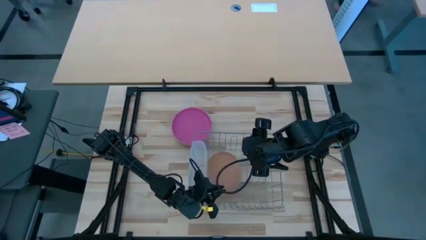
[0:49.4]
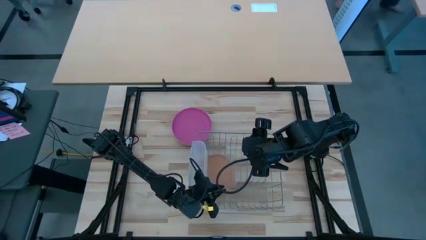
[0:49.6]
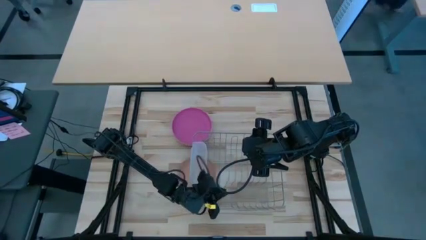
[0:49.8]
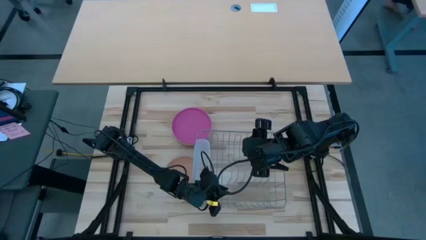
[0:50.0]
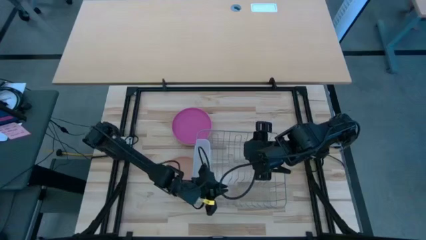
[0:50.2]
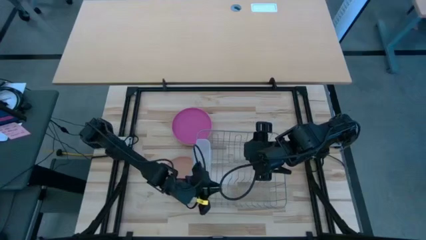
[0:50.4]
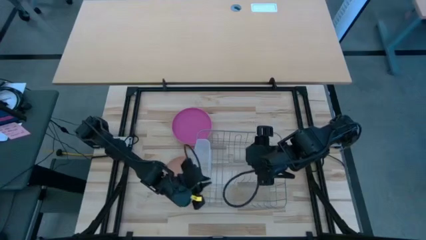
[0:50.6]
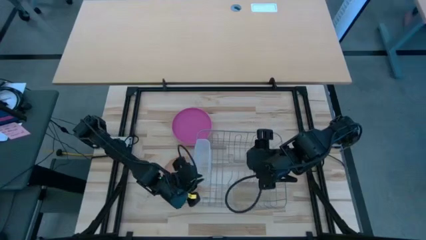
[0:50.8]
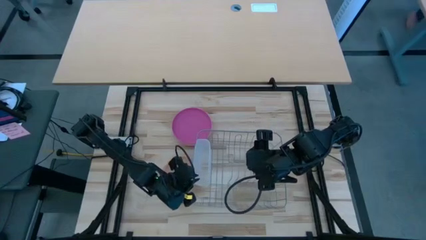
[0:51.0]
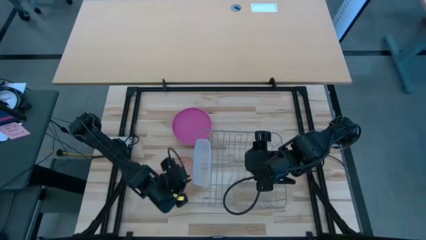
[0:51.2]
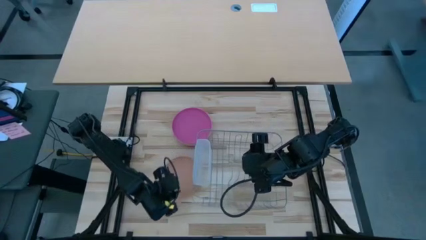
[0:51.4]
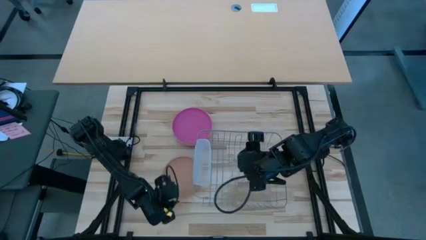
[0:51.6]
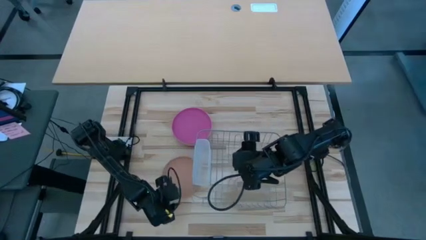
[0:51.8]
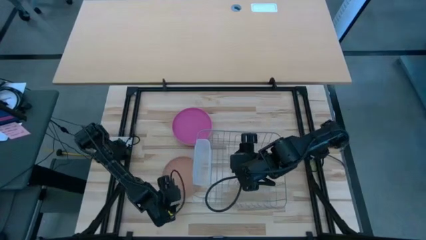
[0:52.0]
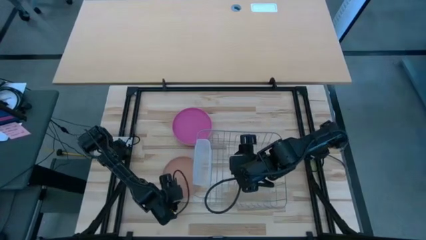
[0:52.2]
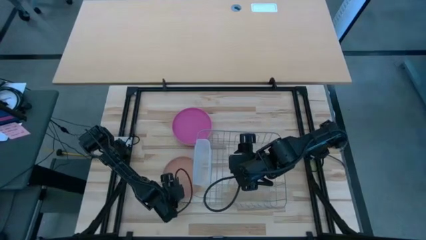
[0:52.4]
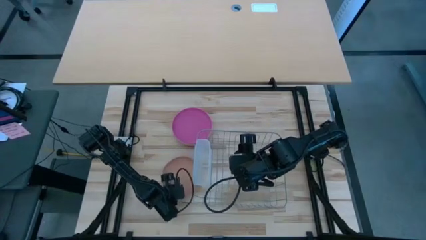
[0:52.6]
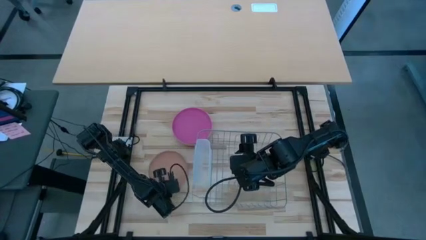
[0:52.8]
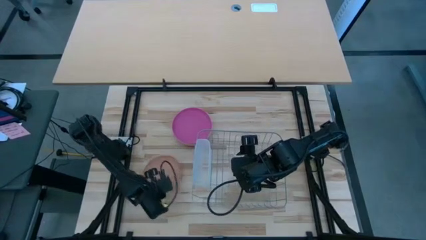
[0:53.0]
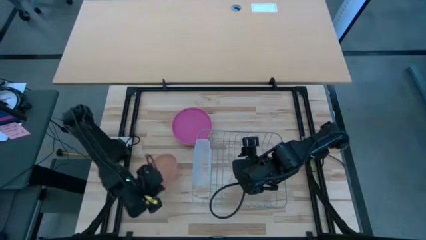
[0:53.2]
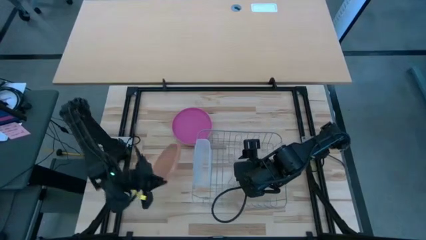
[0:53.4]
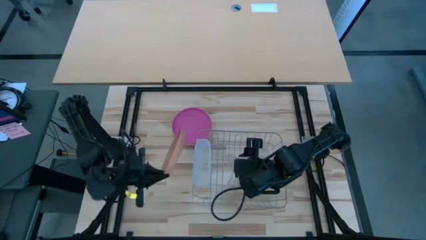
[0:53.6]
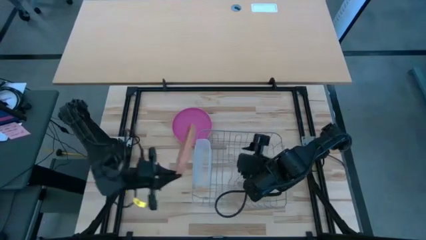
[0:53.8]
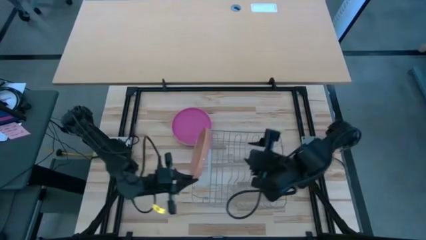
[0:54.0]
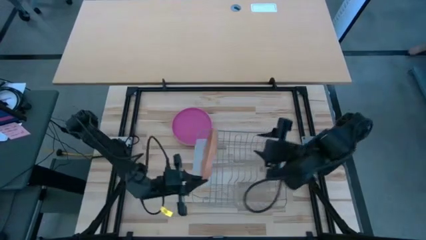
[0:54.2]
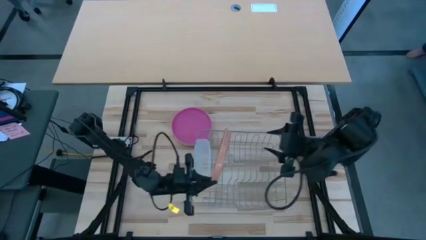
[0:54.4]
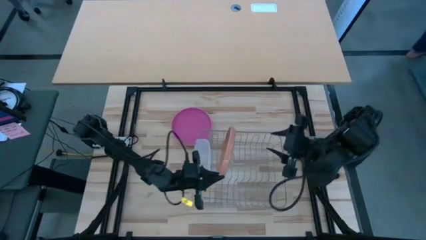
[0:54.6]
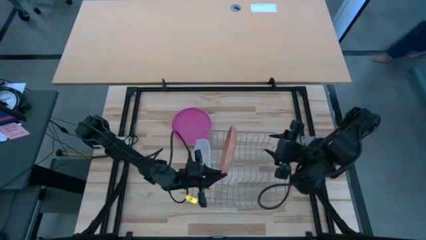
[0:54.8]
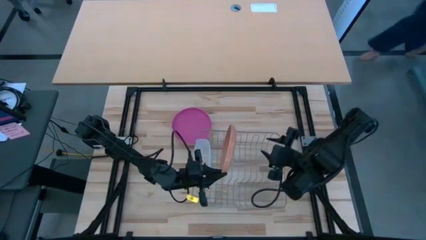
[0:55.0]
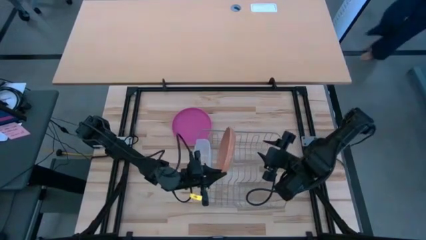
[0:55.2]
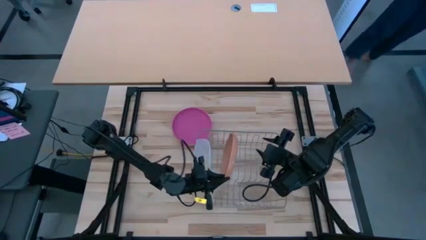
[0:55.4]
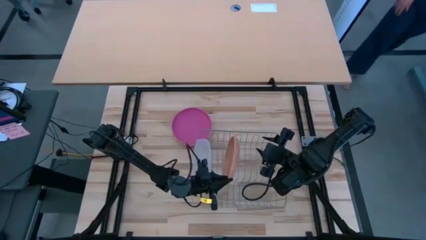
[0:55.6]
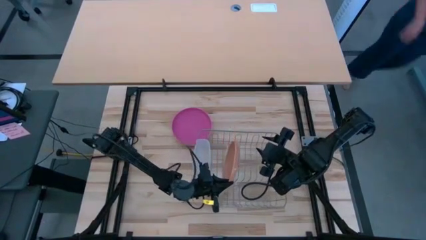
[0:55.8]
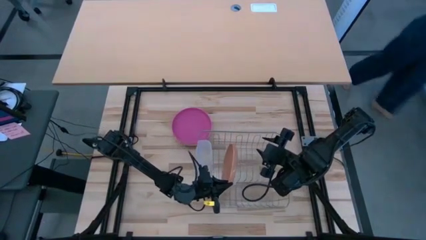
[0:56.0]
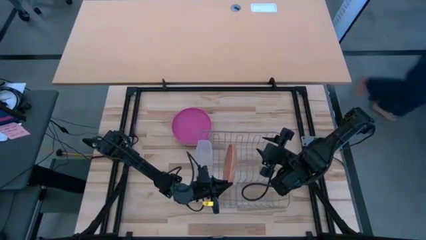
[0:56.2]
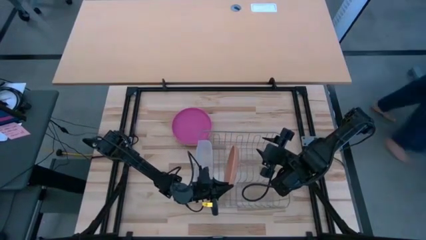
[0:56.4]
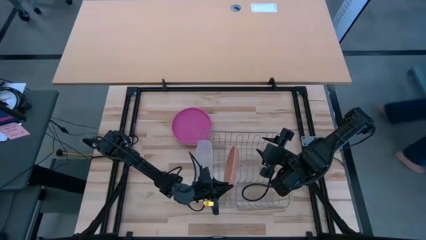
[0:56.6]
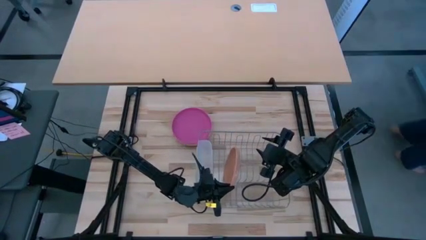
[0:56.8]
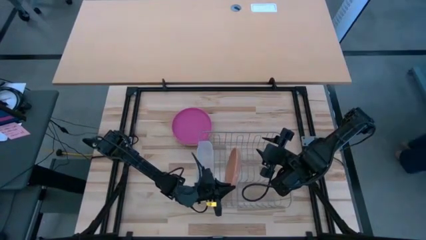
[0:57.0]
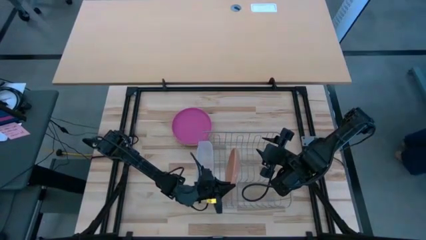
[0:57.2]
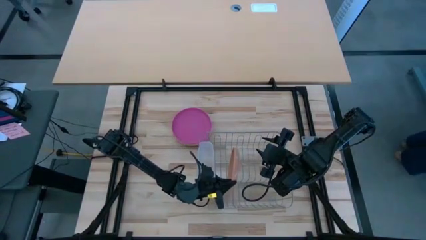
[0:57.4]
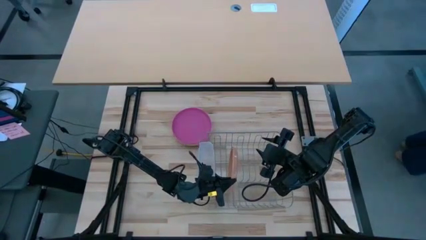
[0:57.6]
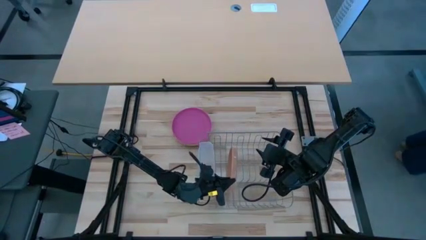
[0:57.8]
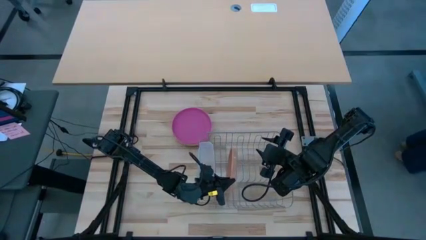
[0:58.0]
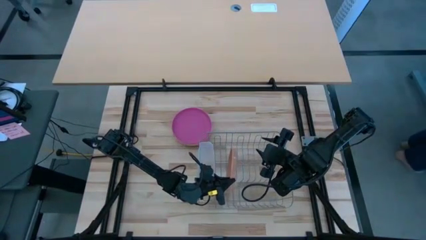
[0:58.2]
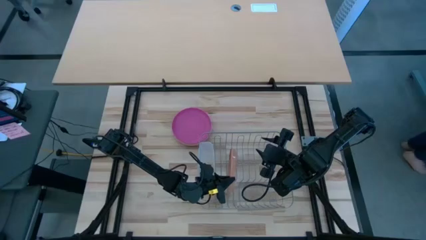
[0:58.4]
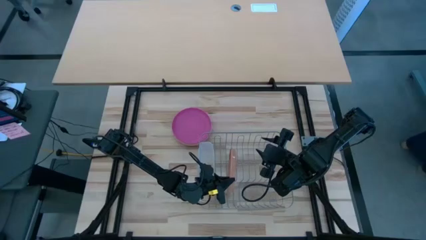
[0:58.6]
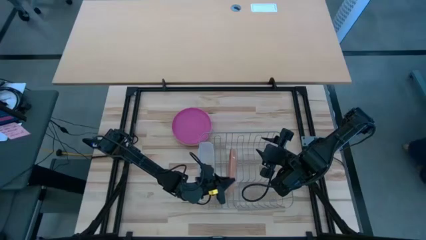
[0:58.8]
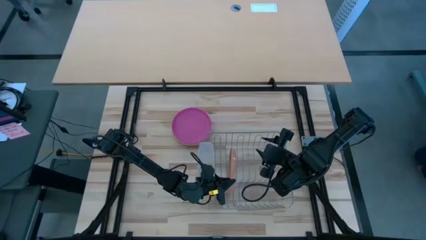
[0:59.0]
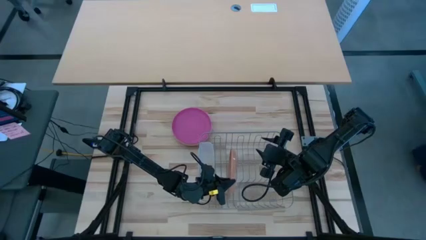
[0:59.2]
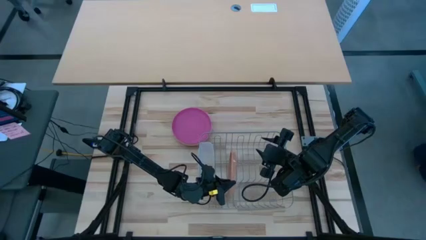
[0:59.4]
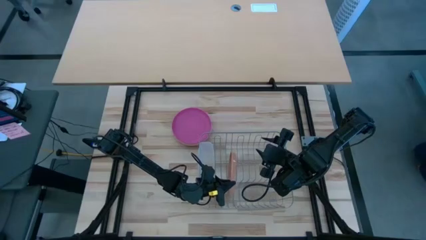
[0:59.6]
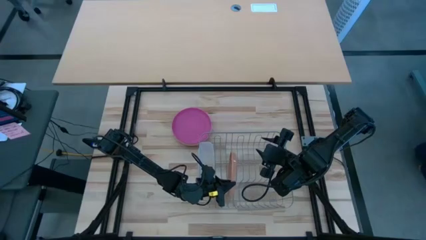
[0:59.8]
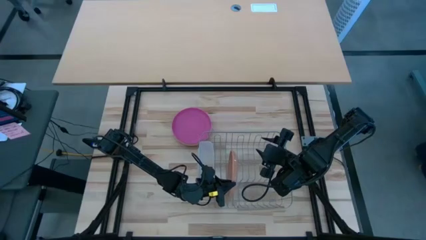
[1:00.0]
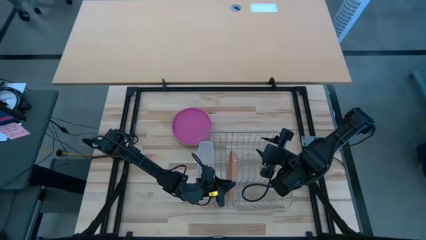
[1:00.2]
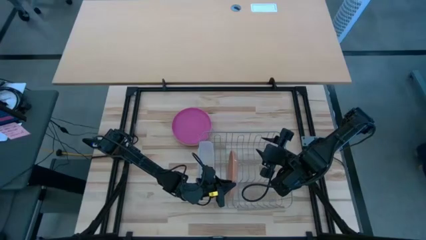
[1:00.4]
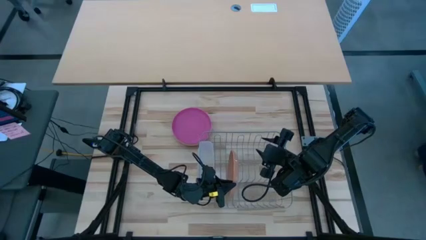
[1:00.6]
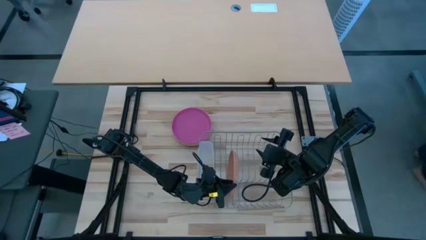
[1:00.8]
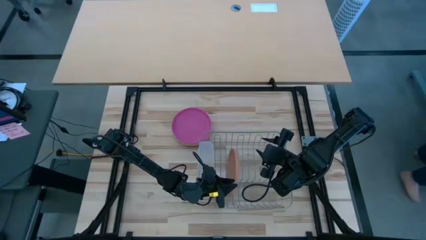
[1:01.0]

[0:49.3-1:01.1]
Task: Sort dishes
Put the light brown plate in the dish rack

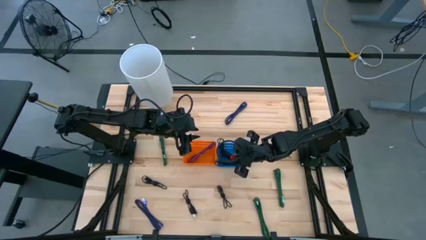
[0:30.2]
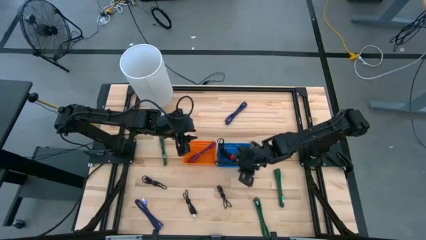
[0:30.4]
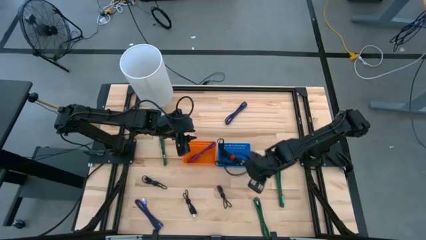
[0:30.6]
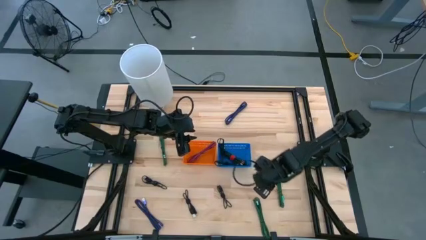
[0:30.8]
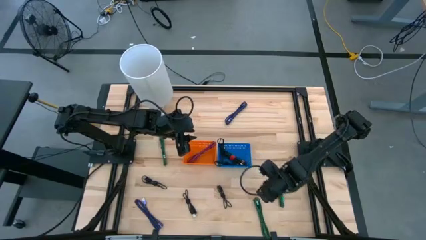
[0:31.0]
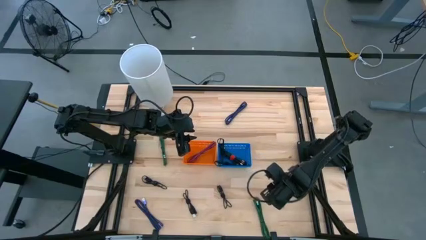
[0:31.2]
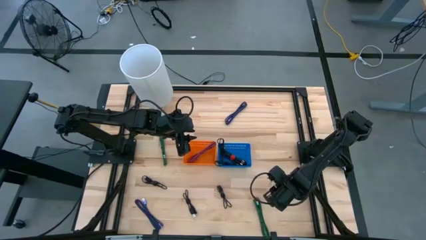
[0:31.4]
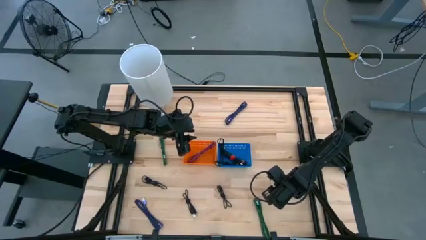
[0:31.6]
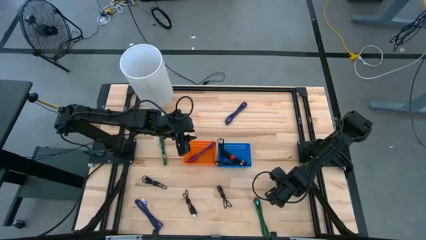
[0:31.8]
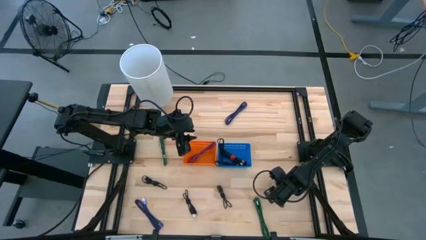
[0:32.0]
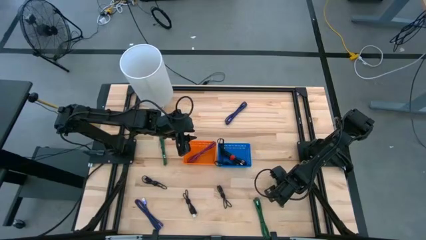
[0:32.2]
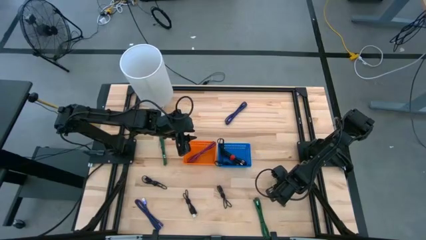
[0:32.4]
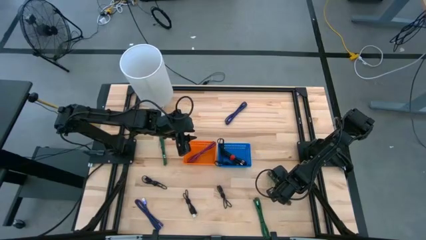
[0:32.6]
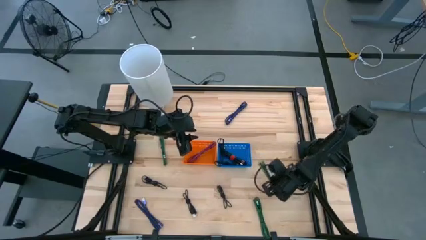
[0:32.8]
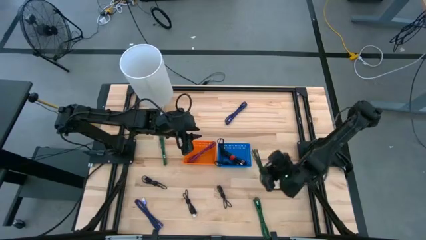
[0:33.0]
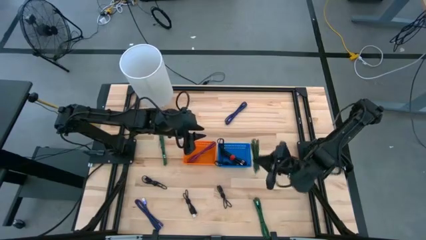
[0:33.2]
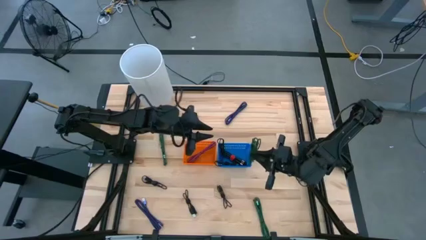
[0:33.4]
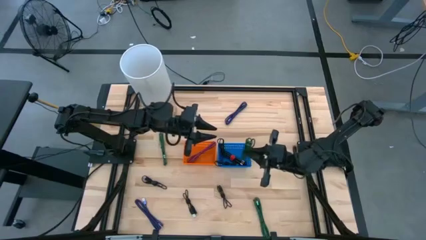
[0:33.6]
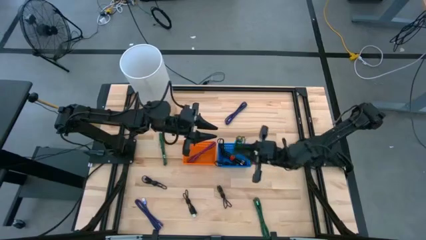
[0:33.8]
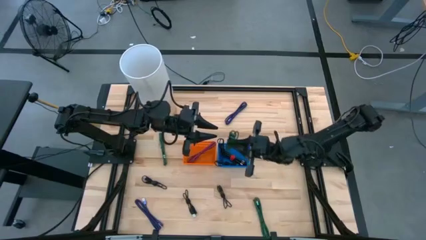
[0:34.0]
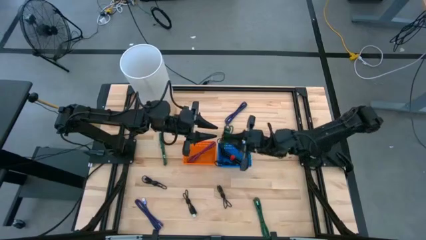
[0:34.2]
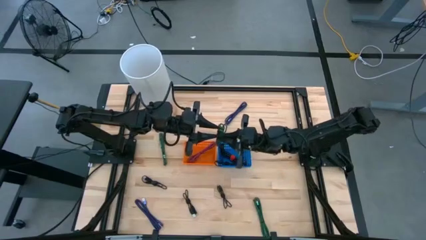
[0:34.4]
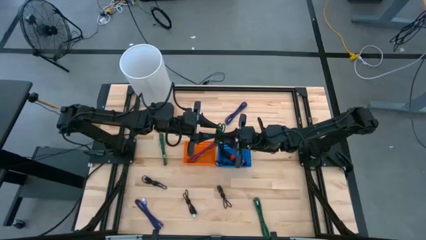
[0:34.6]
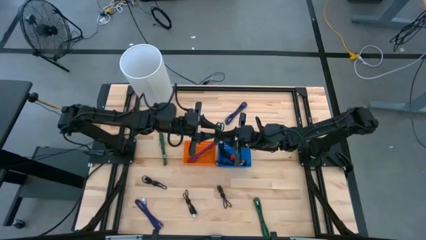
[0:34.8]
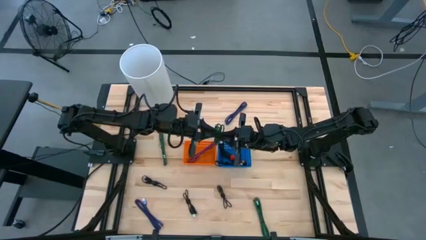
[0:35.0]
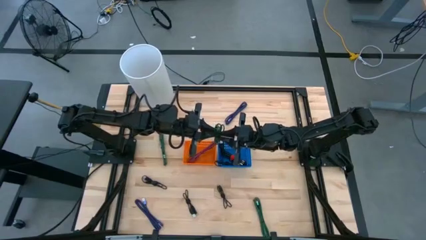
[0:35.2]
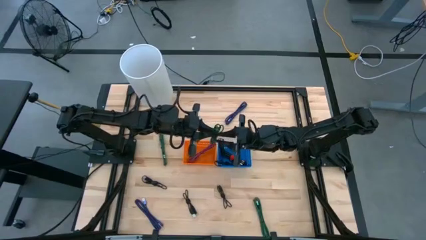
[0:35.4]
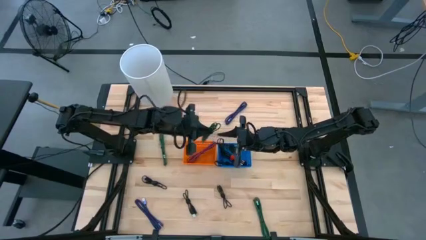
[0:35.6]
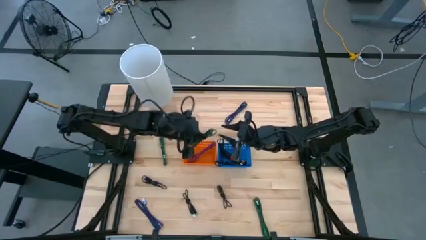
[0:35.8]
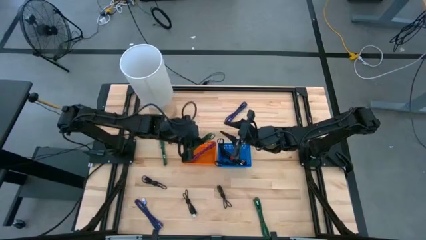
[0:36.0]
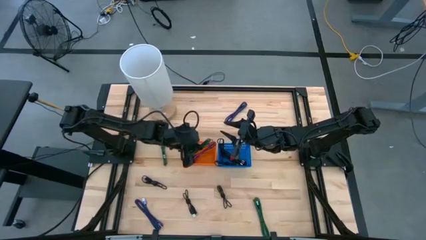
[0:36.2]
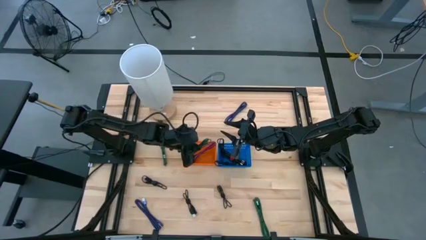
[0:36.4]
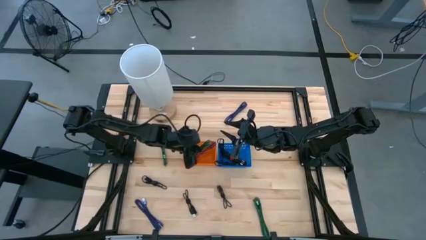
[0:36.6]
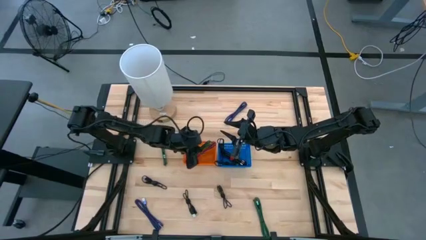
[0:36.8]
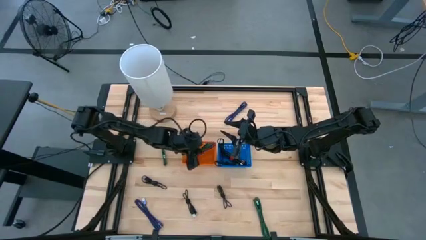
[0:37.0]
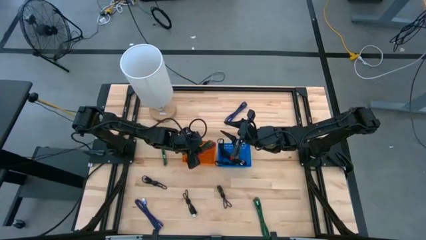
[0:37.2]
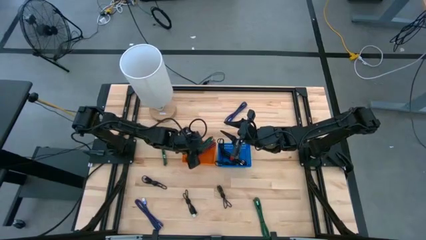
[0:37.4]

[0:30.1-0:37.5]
Task: Pick & Place USB Port
Put the green charger cable into the orange bin
